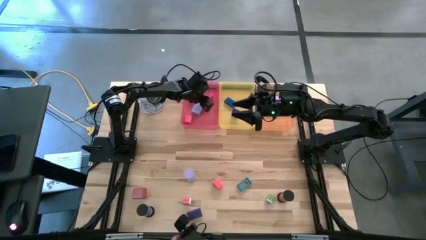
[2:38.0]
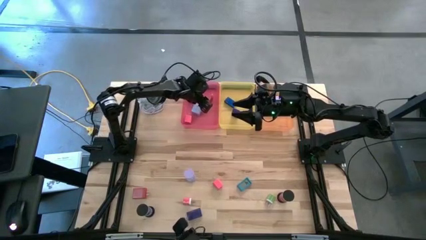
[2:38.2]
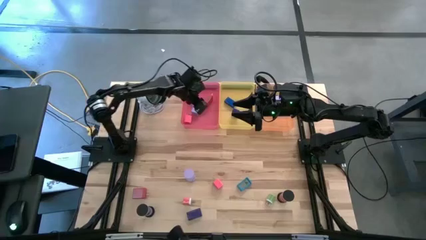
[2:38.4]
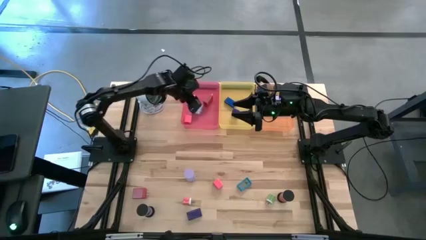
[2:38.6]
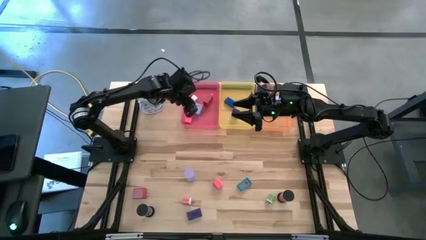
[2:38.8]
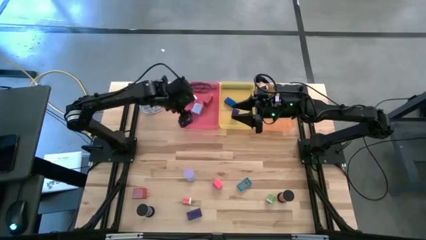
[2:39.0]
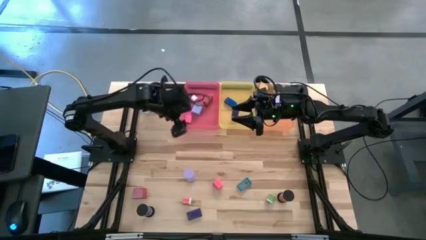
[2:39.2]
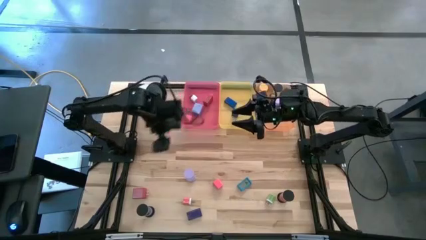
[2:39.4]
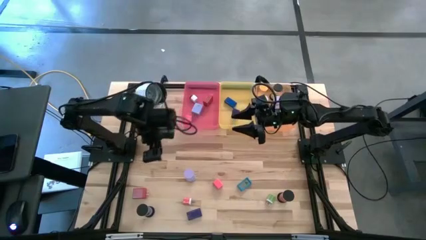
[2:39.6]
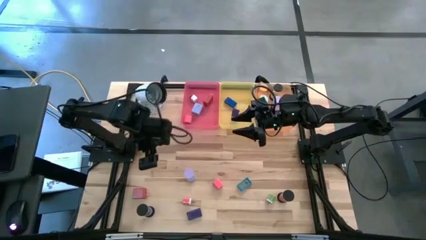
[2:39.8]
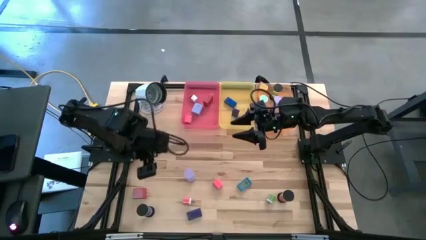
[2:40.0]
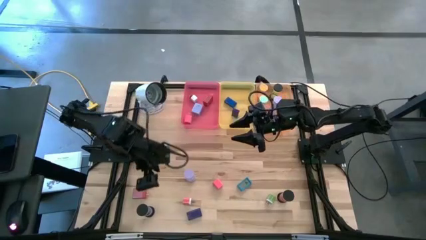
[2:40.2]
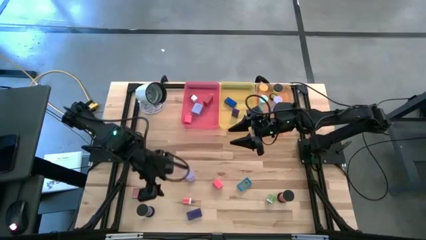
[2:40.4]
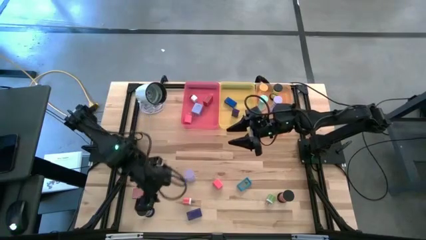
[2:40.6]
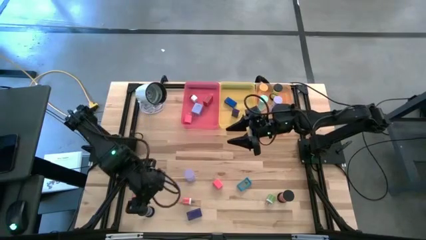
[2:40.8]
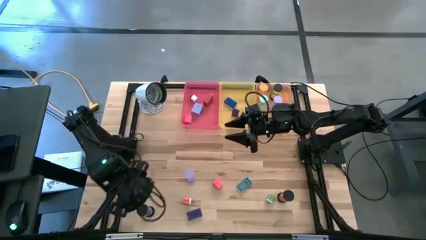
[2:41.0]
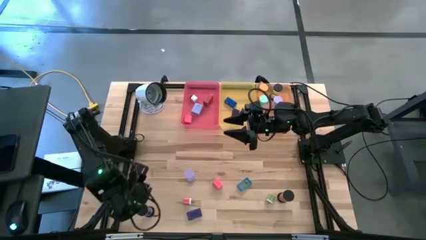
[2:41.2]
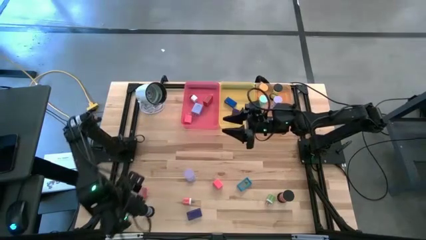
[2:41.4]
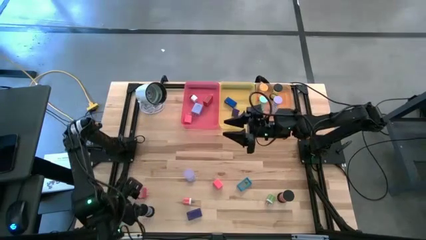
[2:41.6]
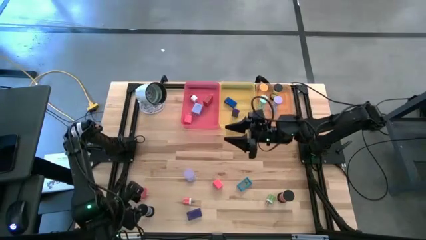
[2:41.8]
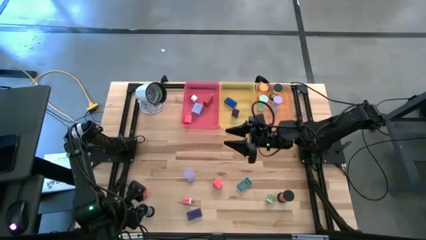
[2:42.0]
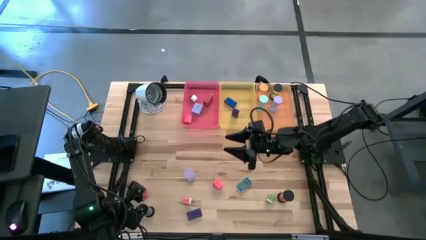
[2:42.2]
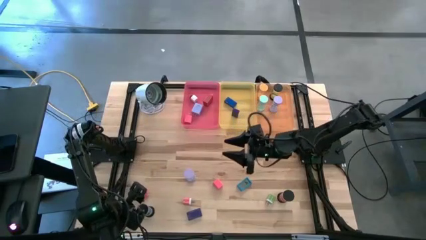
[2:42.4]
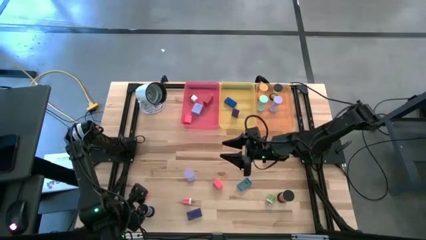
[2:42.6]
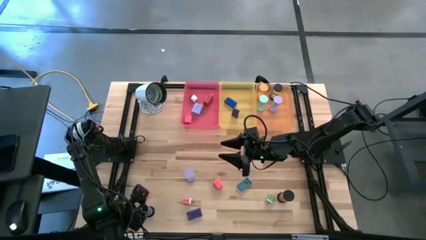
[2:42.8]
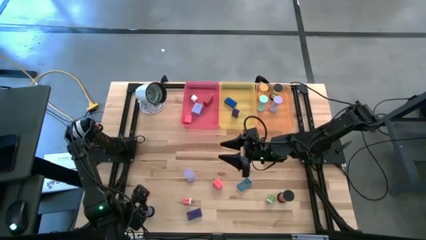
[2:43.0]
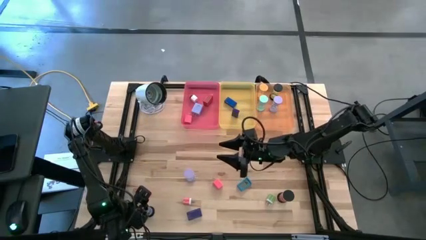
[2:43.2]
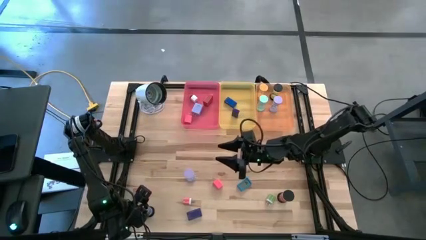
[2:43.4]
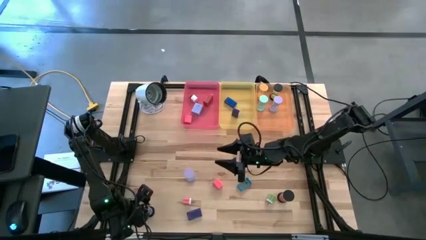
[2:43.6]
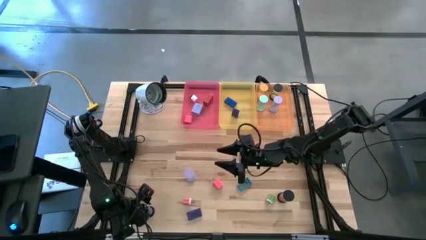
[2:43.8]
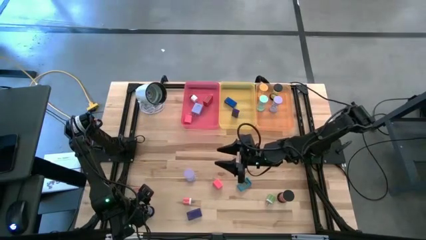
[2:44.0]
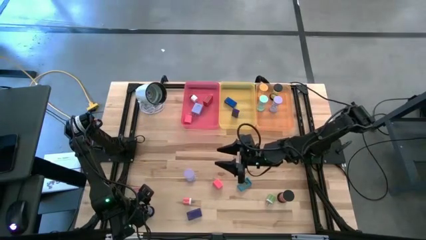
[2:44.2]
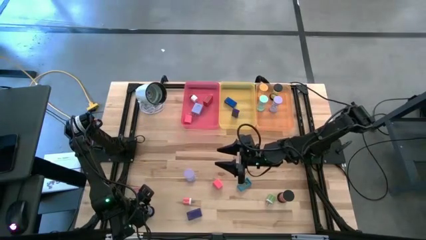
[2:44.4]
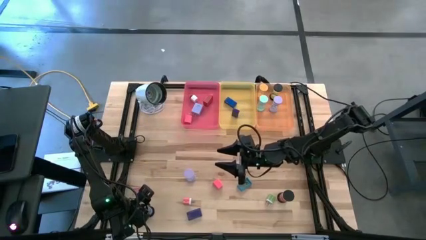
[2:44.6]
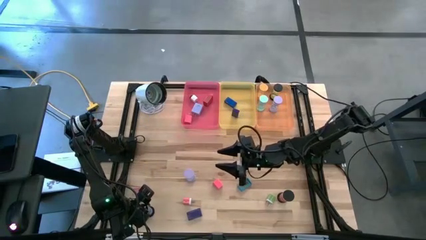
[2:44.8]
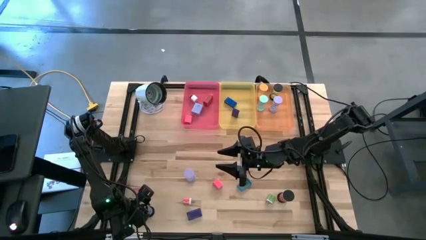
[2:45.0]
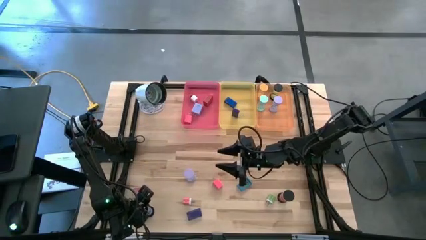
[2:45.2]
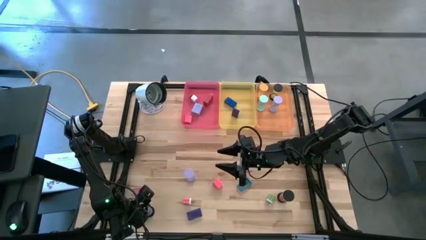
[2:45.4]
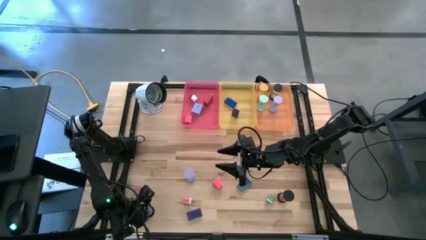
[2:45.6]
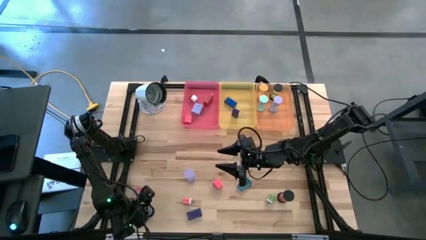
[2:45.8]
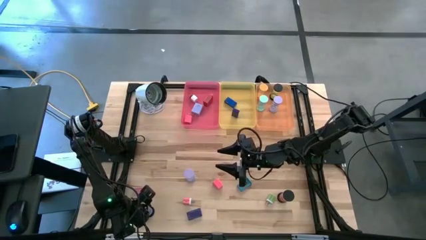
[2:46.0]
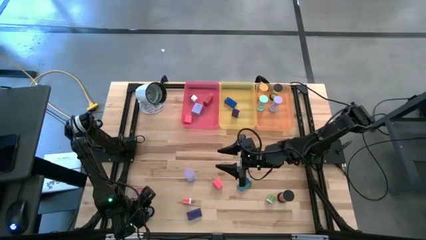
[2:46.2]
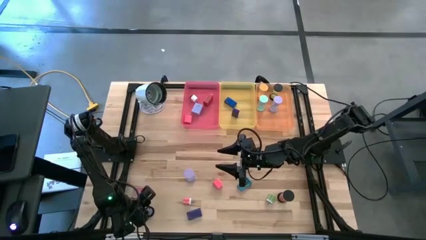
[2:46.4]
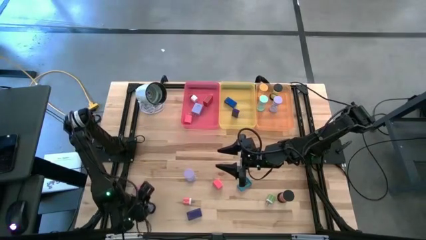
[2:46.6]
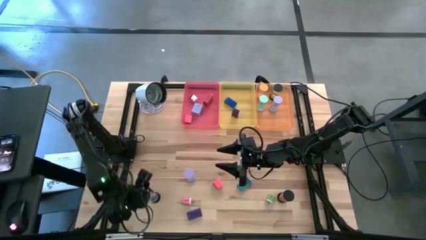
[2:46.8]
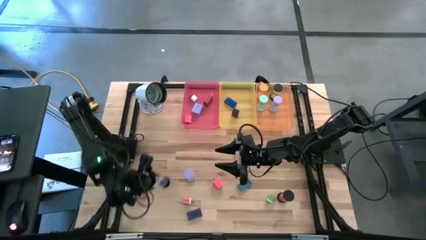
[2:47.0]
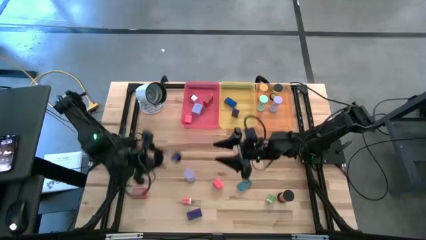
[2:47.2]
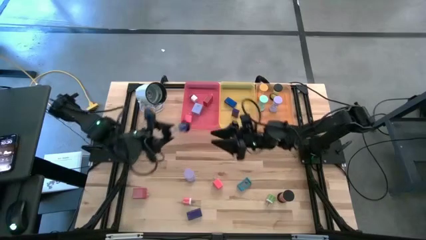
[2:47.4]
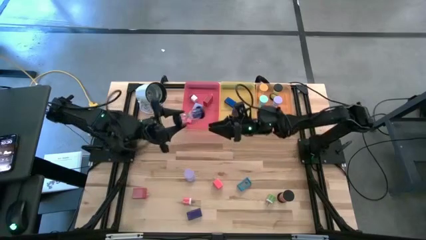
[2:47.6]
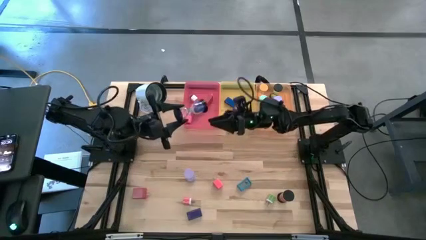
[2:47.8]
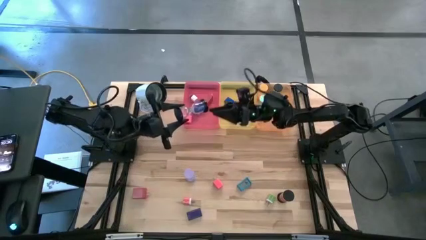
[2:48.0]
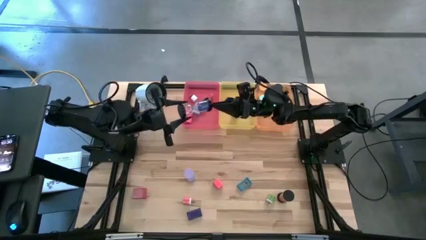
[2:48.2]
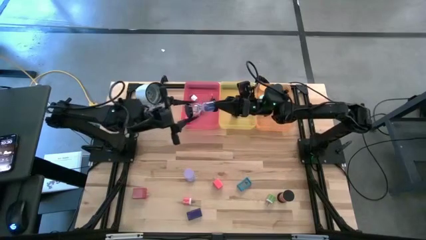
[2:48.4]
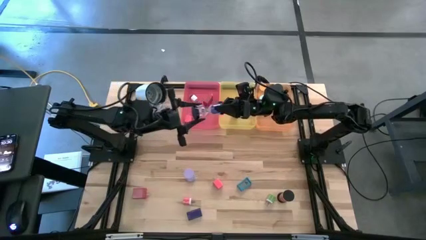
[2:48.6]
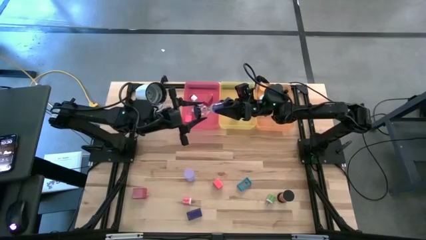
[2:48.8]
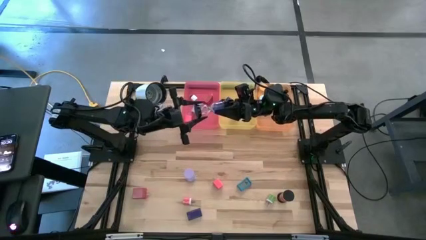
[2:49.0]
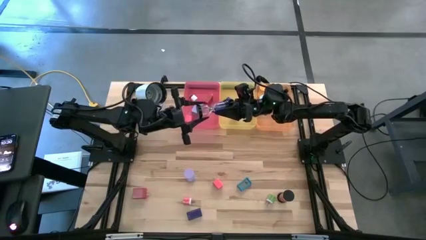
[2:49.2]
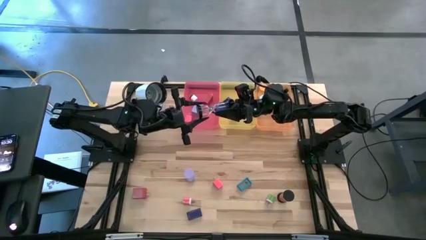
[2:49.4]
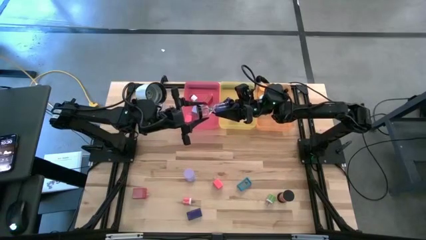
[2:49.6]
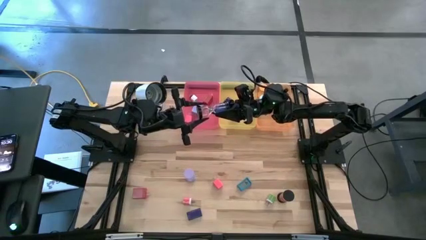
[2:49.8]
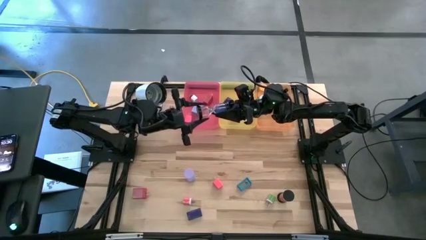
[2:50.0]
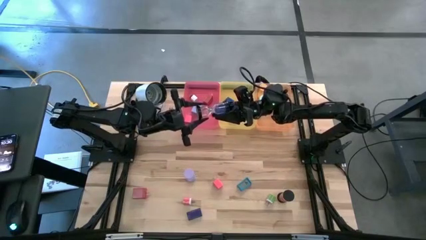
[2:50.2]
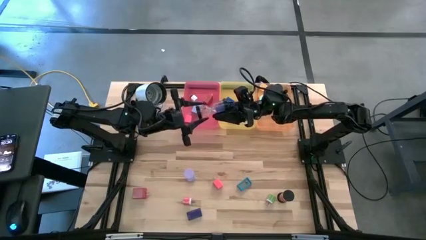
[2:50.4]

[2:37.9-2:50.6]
Task: Pick & Place Office items
Put the black blue hourglass into the orange bin

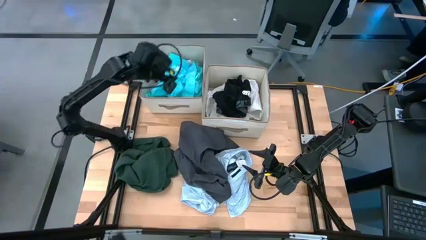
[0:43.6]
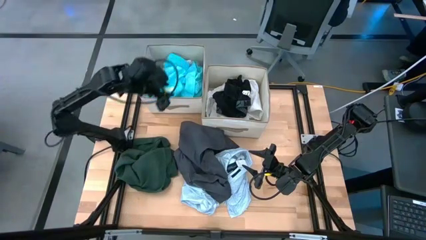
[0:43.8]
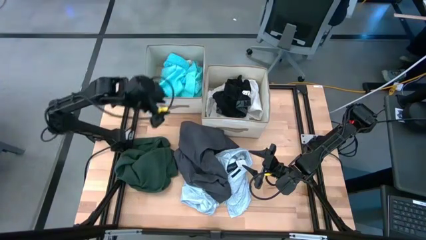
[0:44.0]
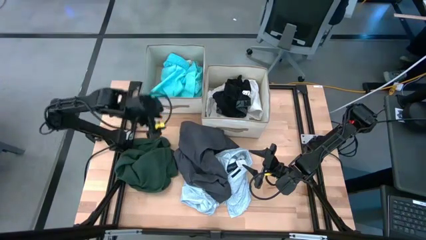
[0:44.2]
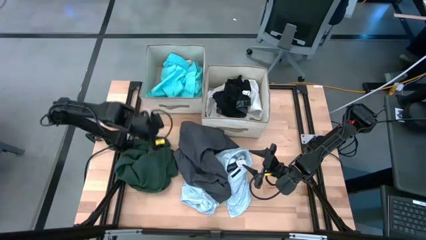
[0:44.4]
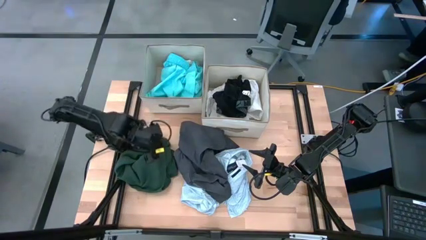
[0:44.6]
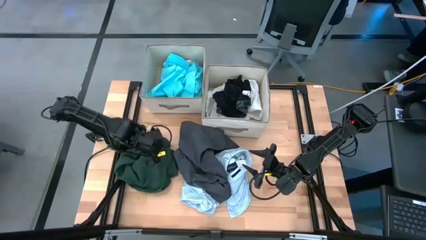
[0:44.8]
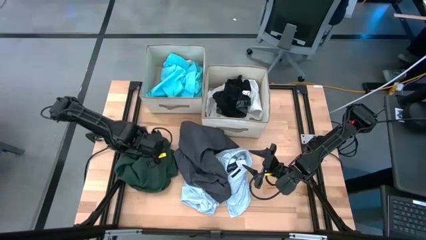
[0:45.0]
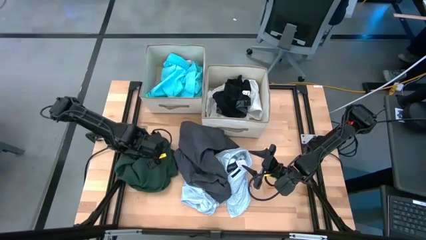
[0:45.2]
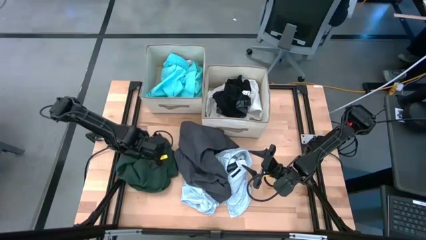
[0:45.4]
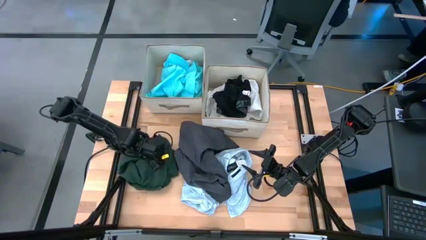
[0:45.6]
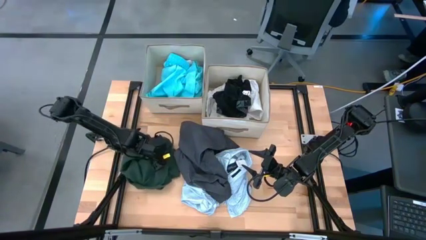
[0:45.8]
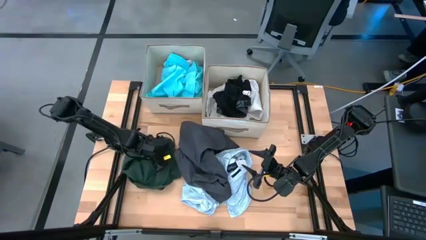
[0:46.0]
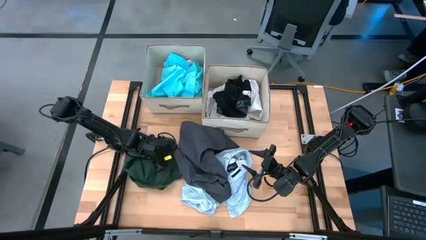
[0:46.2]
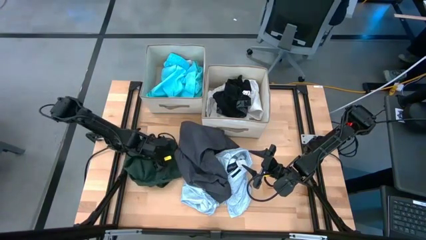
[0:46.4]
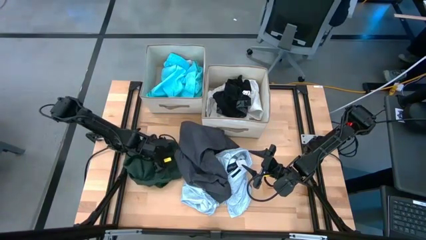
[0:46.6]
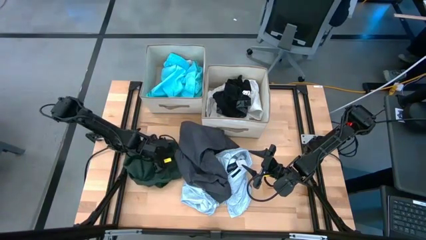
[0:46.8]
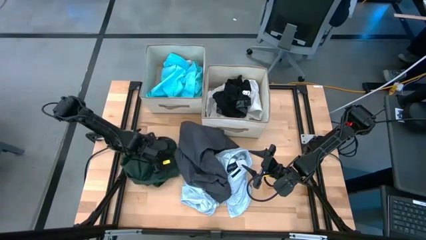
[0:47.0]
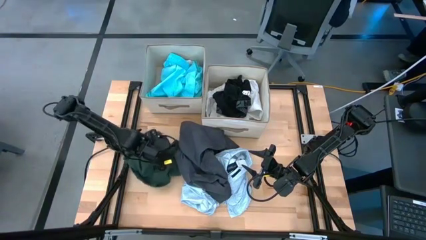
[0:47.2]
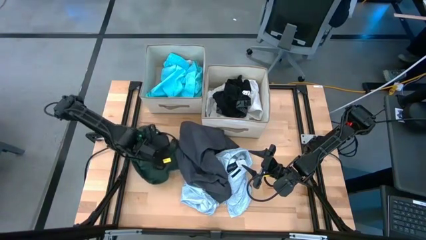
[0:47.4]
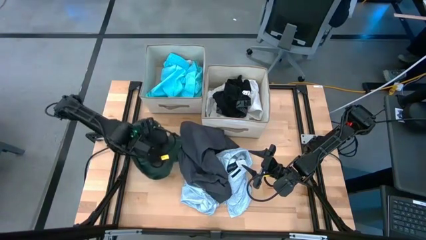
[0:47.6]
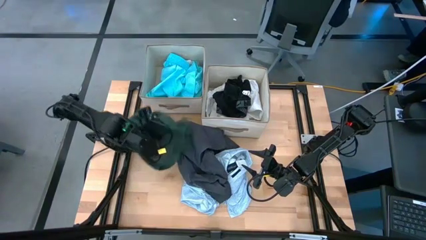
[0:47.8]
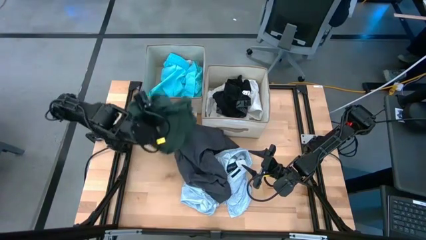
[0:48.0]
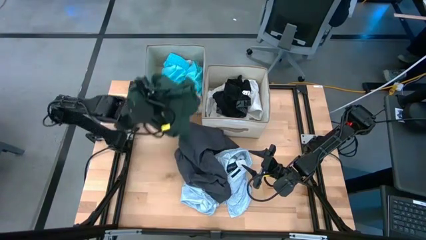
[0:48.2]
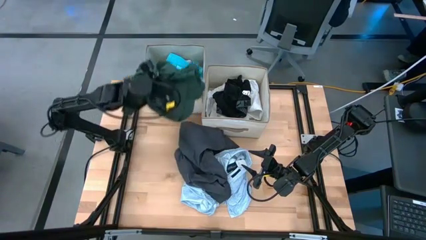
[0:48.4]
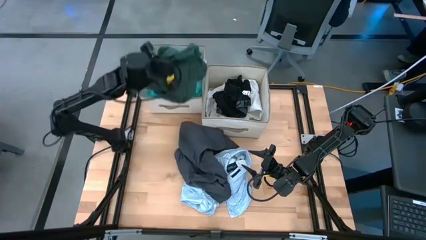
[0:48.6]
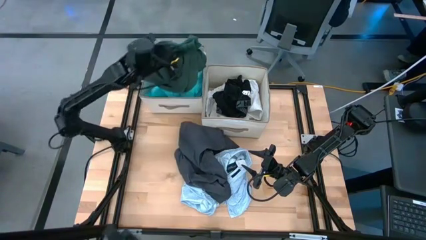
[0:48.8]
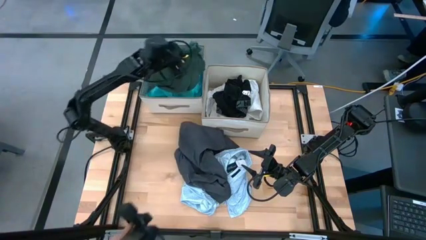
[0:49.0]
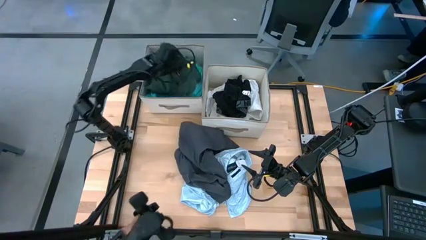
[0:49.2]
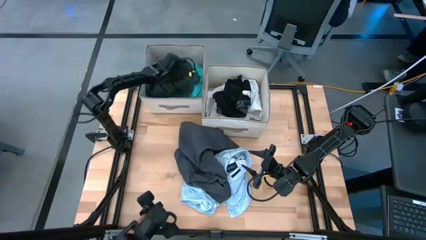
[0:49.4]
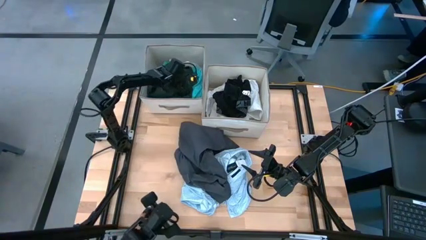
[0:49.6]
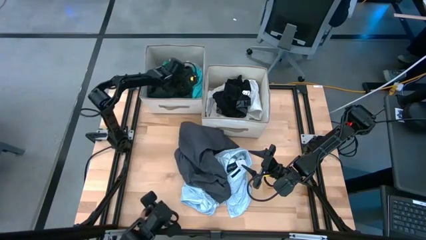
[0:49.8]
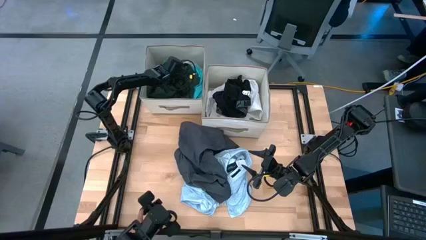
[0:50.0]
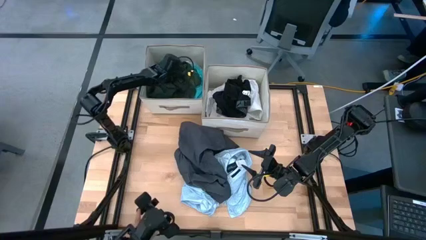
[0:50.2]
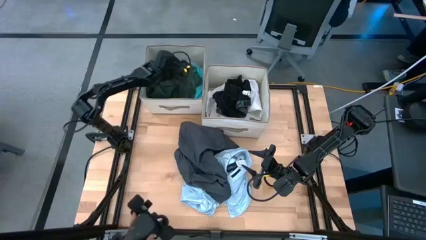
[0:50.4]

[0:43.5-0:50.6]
Task: Sort clothes
Put the dark green shirt into the left laundry organizer
